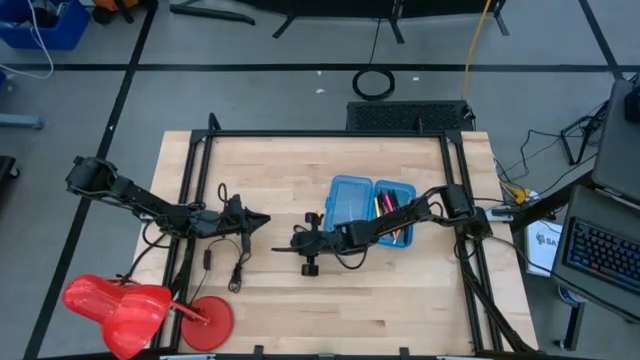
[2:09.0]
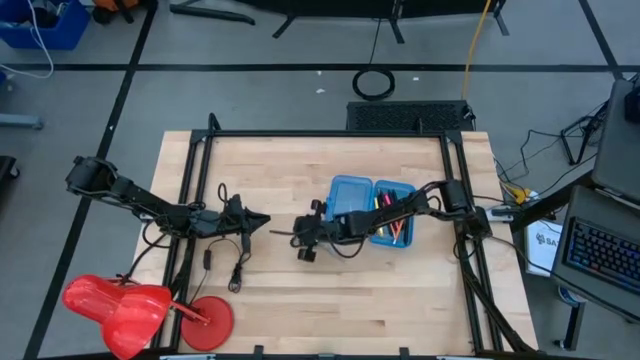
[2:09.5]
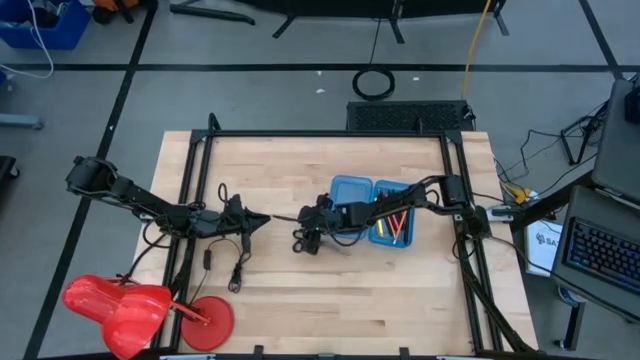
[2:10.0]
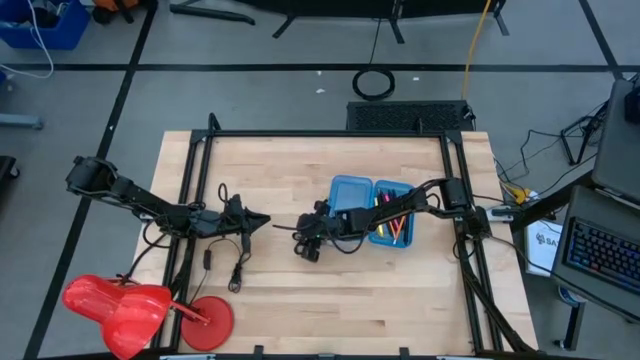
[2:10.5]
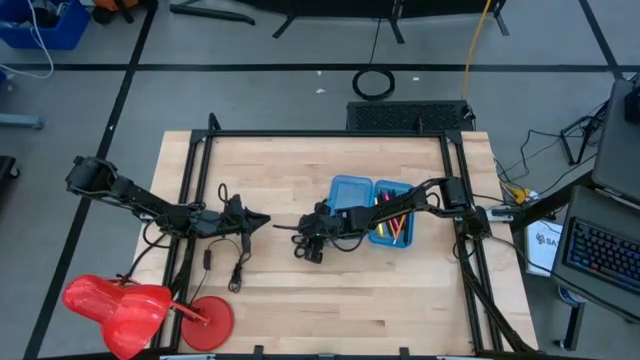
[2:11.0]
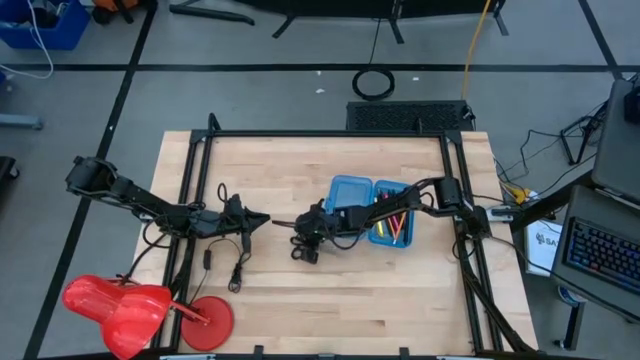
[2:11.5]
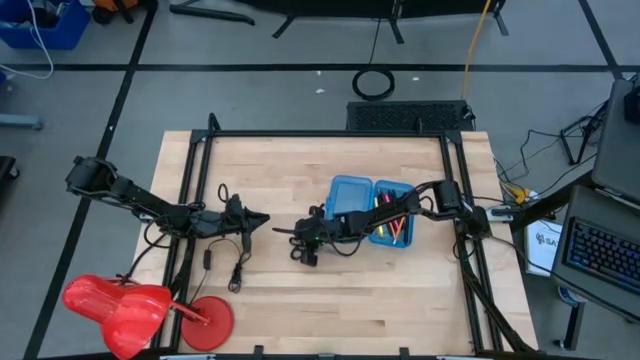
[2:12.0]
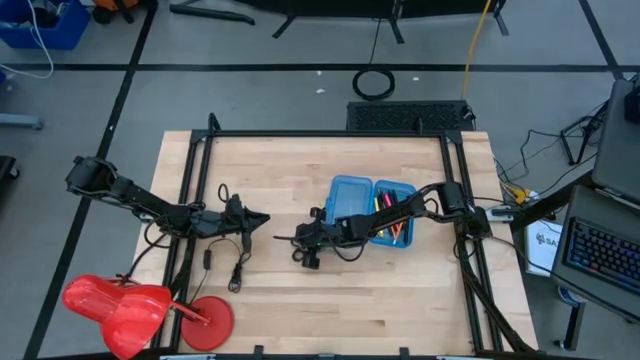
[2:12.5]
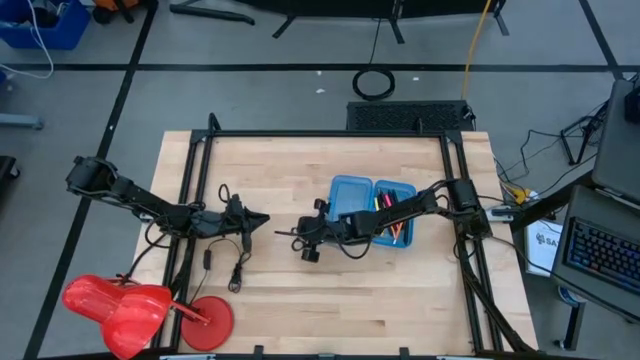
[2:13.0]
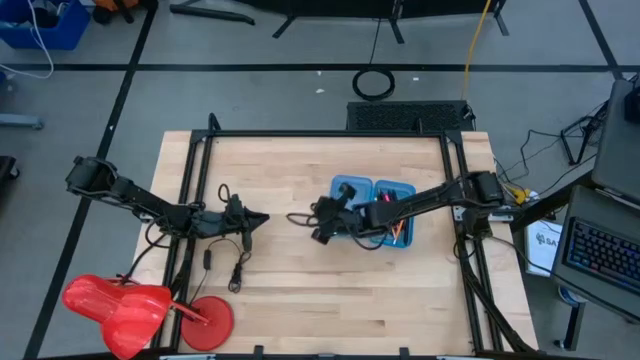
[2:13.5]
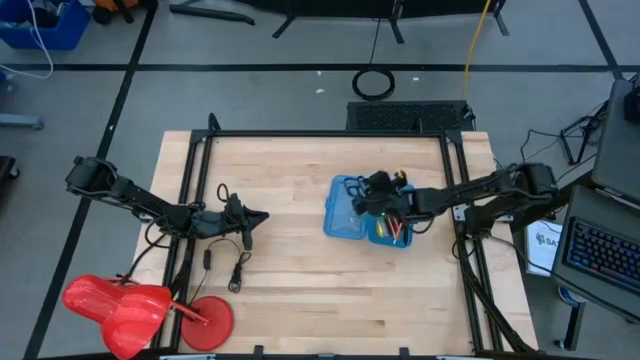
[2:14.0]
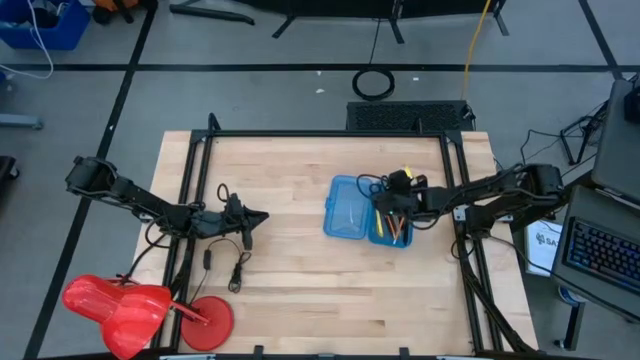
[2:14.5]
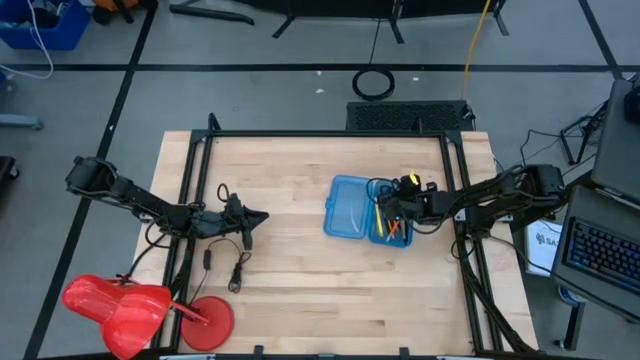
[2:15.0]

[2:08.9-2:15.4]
Task: Pick & place school supplies into a supply box
Put the black scissors into the blue supply box

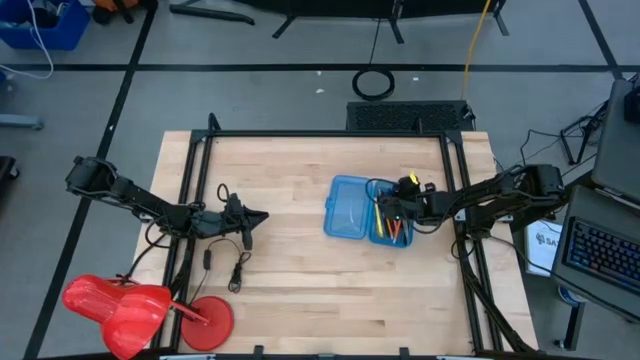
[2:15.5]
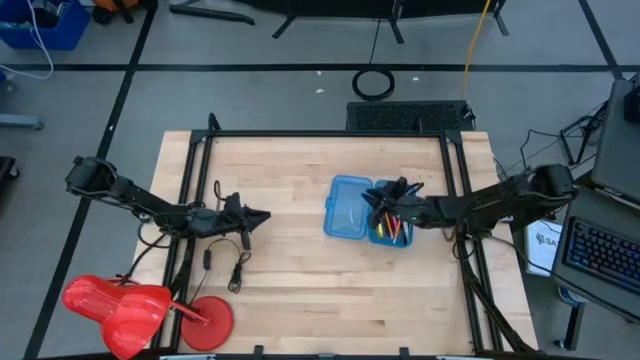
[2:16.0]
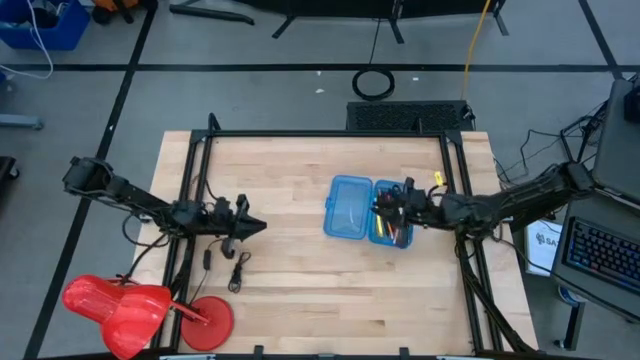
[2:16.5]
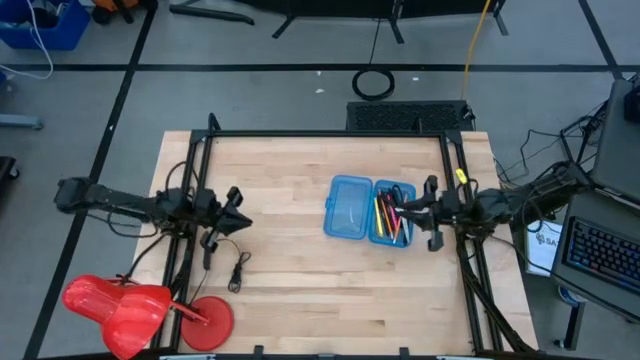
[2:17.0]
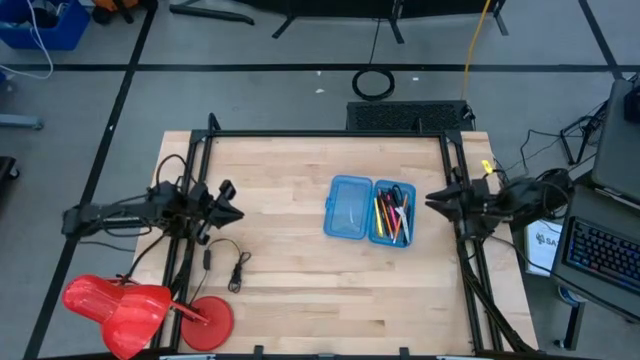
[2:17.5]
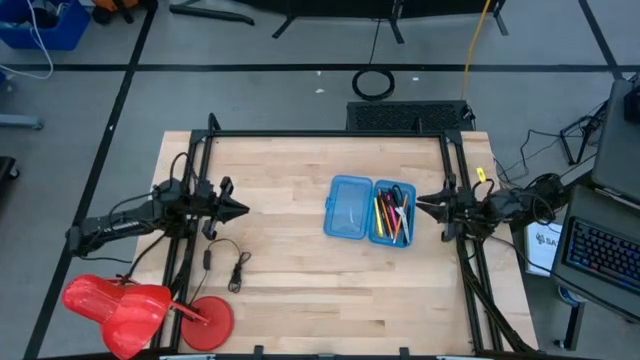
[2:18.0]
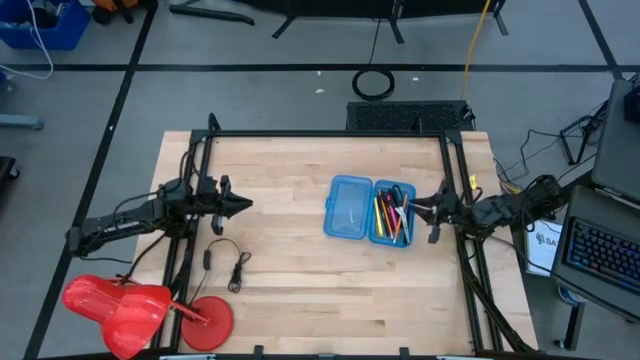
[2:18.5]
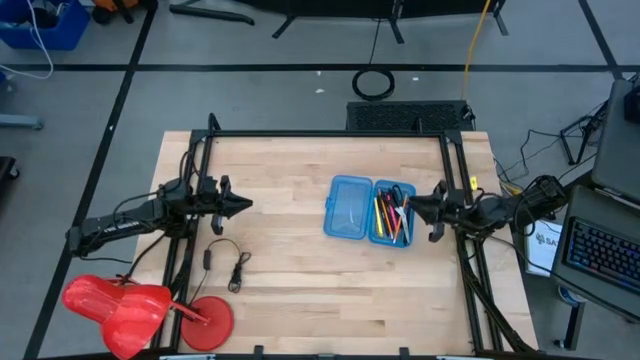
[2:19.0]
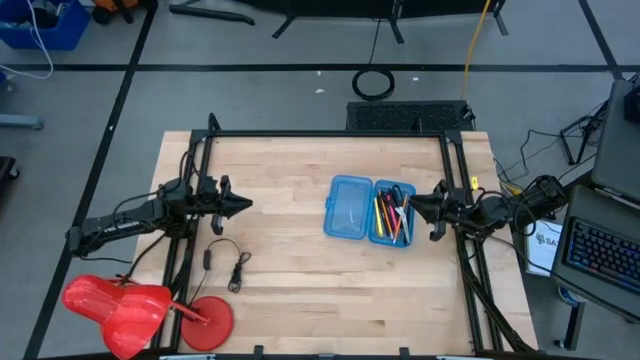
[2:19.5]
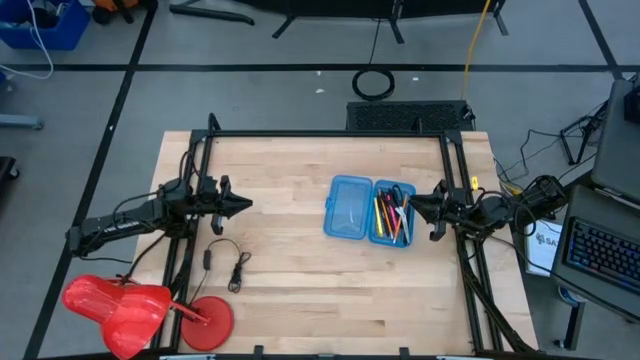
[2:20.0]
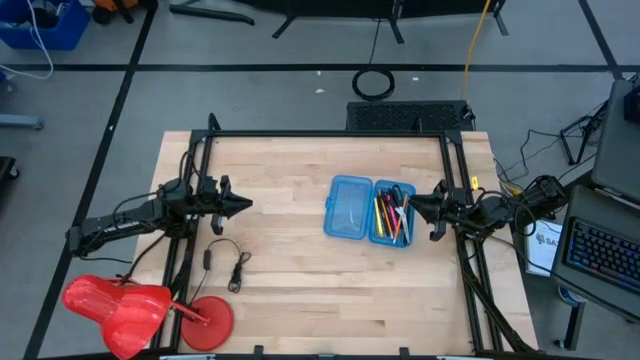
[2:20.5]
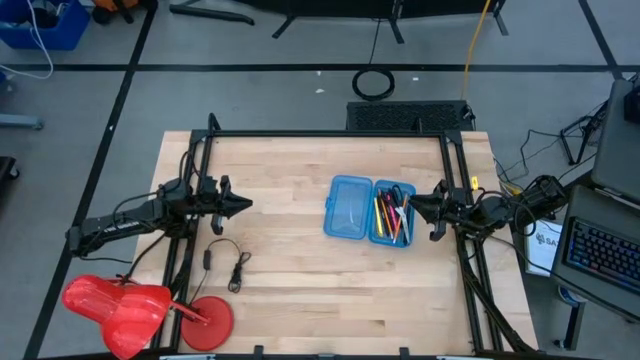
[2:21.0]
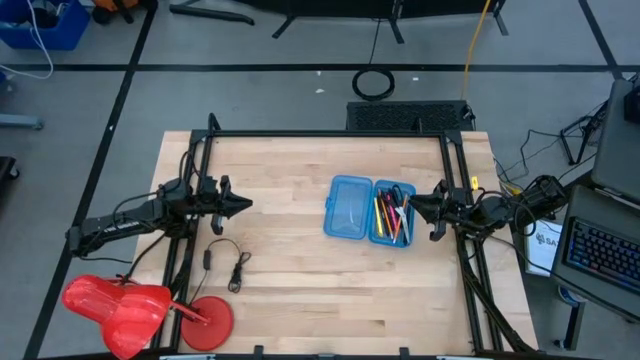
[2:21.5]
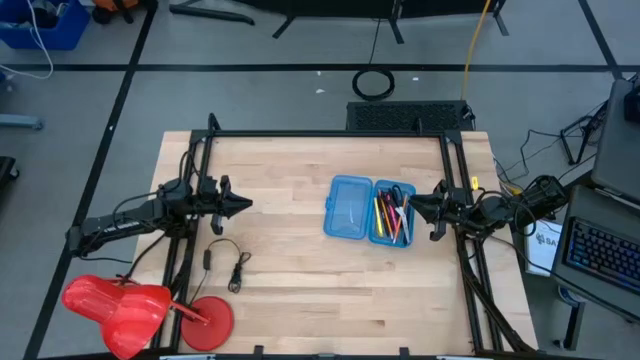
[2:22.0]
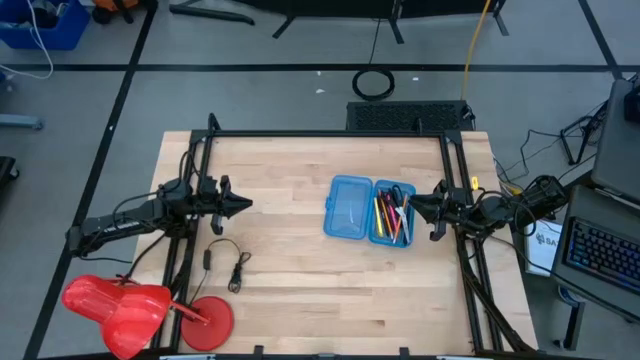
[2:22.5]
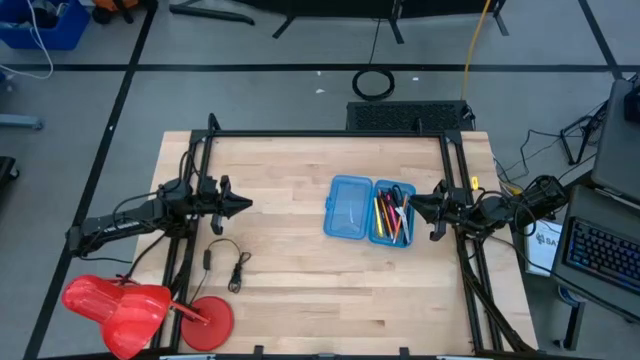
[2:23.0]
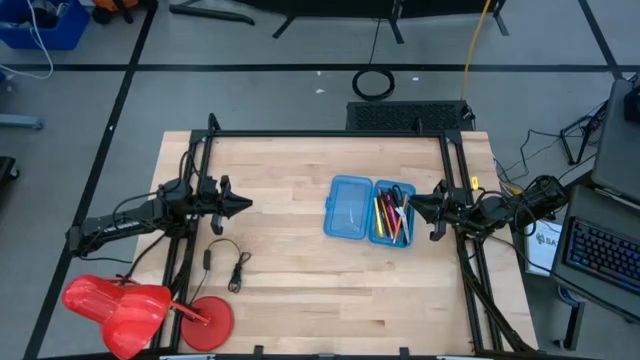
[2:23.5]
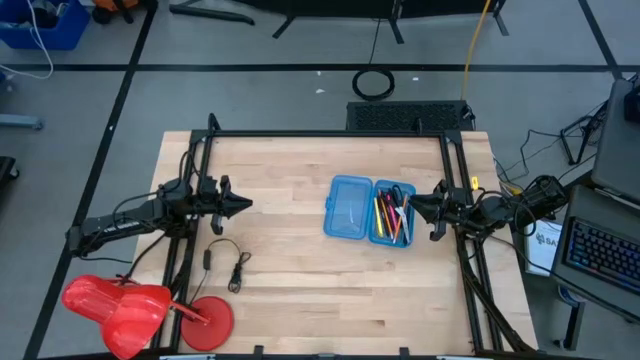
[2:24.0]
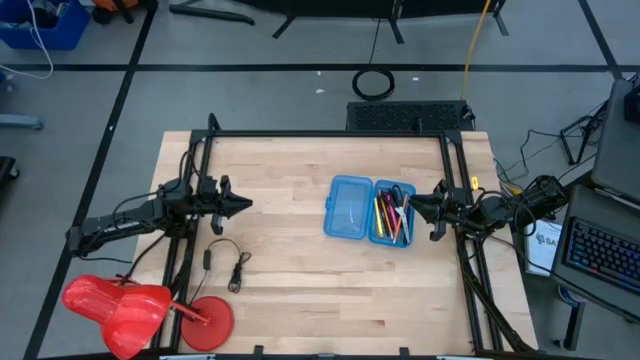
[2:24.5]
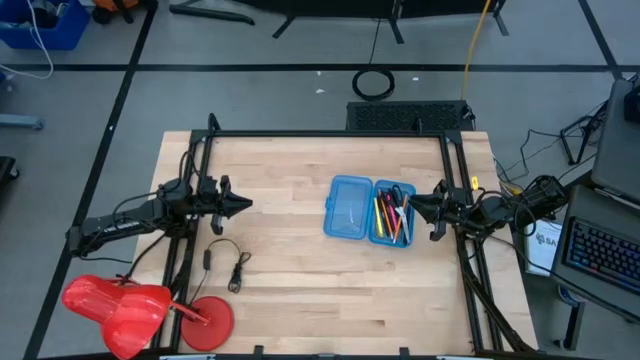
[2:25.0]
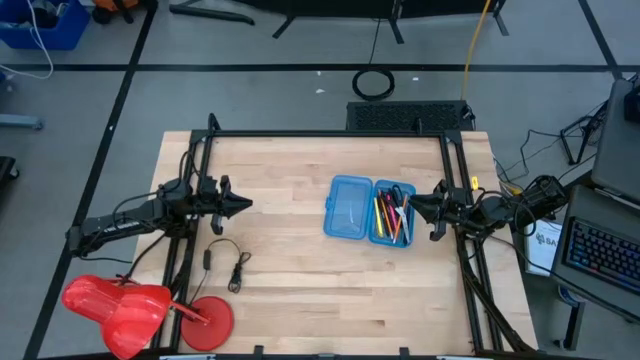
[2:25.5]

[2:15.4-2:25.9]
Return to Home Position

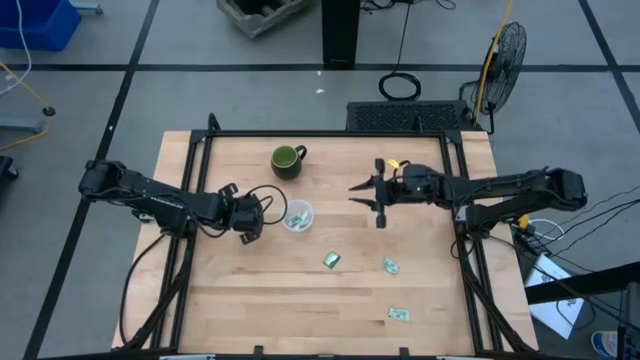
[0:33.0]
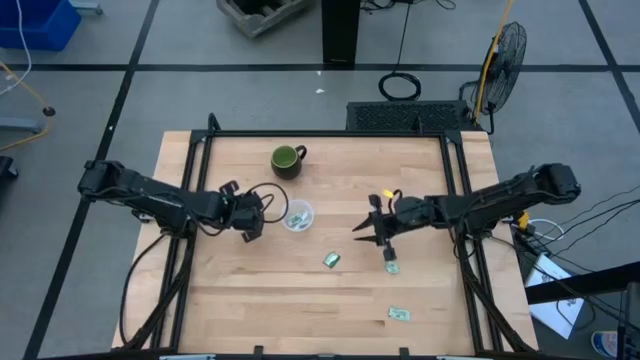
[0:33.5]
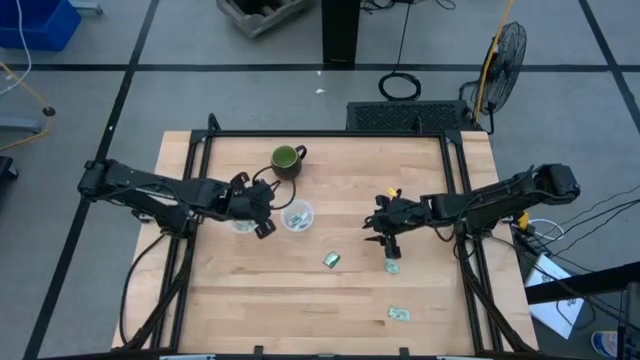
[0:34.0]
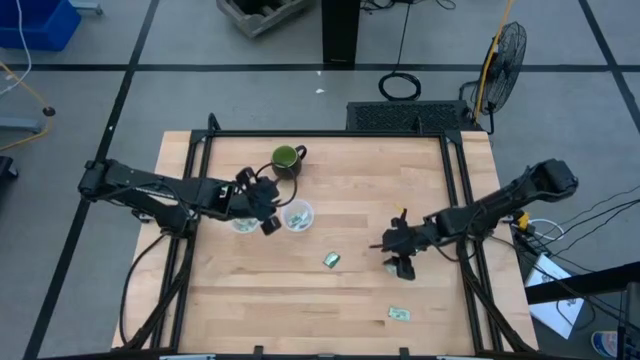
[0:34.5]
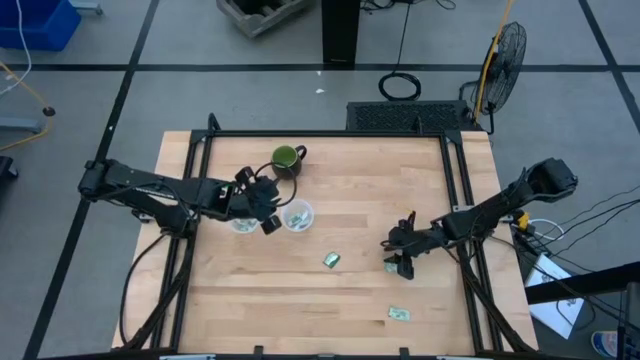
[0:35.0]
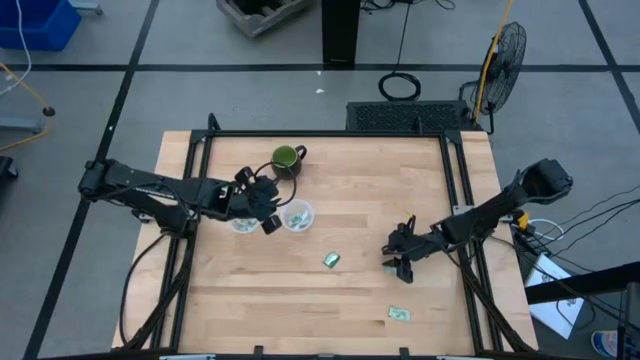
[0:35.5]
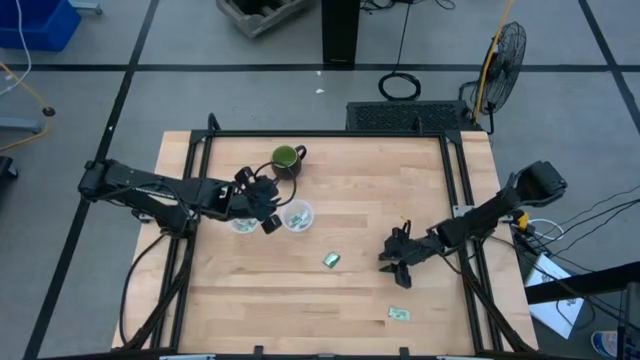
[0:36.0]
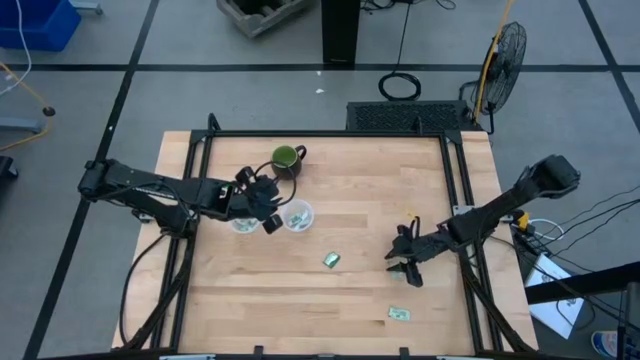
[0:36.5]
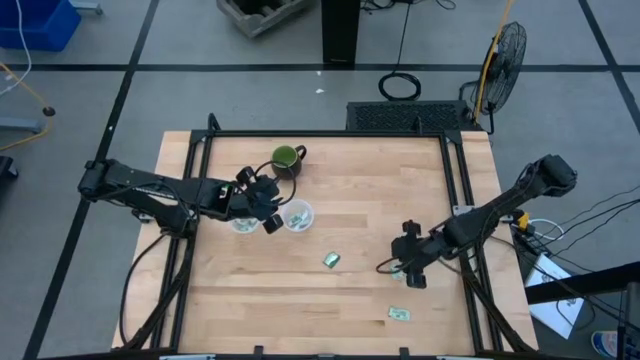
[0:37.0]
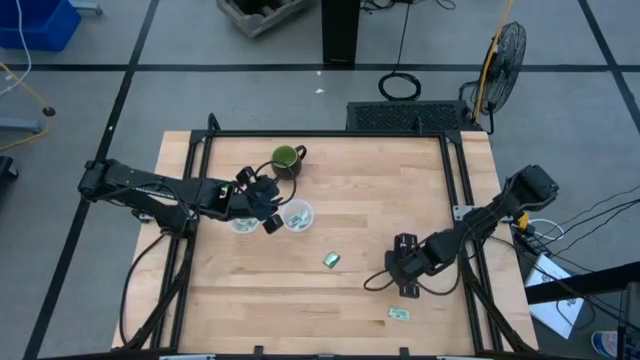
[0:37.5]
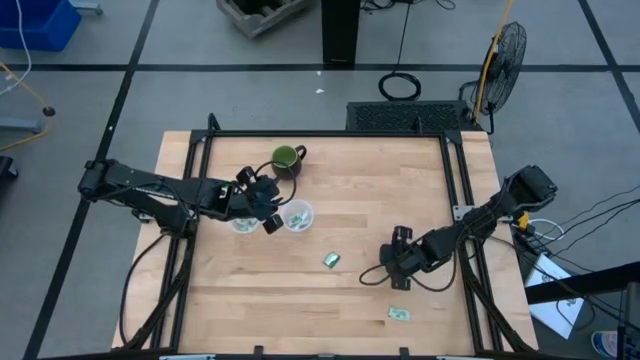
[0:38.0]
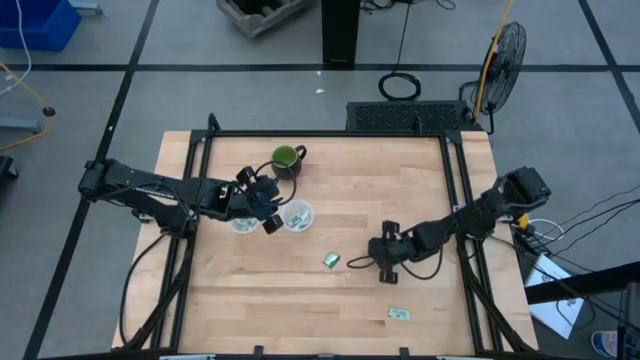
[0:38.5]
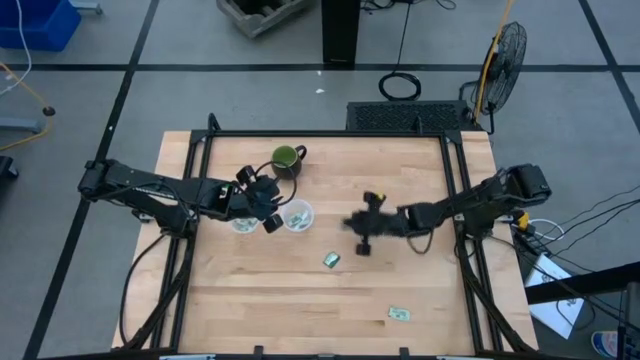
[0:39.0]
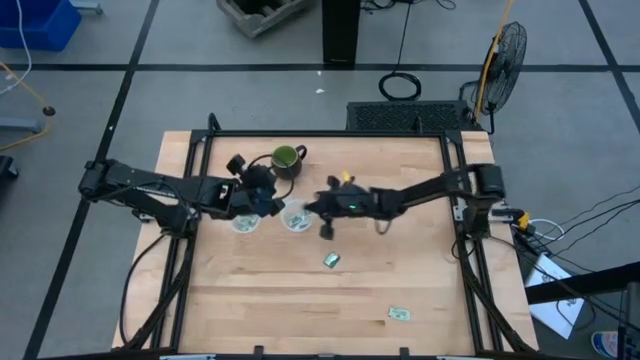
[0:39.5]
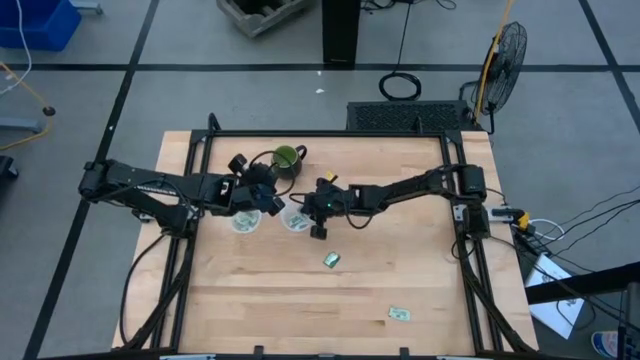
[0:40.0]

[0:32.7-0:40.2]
Task: Pick and place Stevia / Truvia into bins
Put the stevia pocket in the right plastic container
